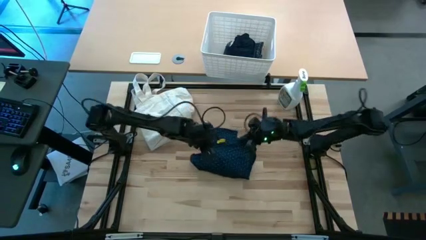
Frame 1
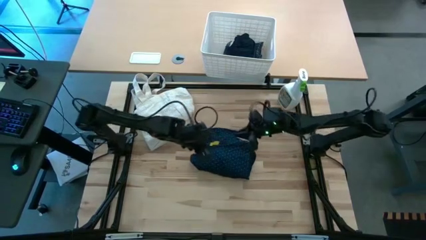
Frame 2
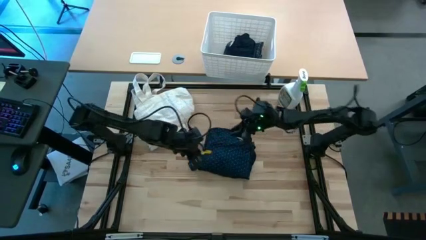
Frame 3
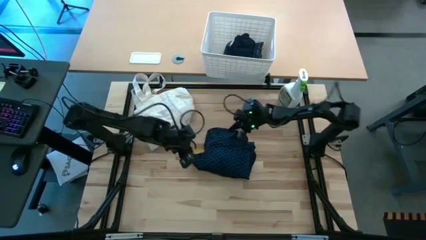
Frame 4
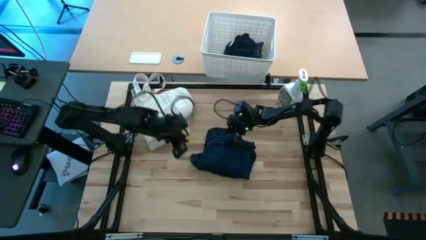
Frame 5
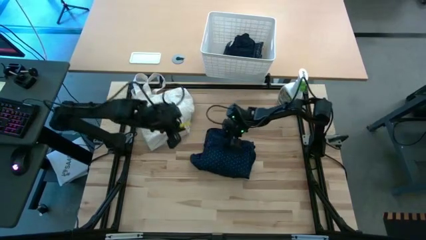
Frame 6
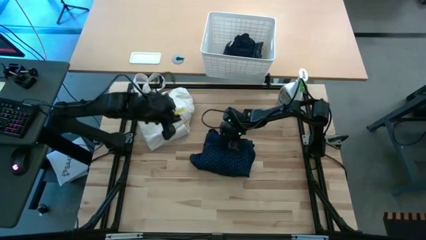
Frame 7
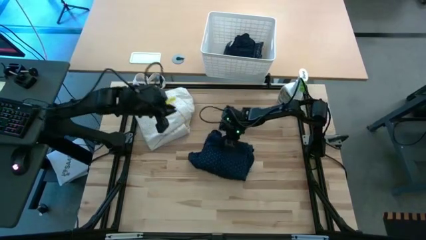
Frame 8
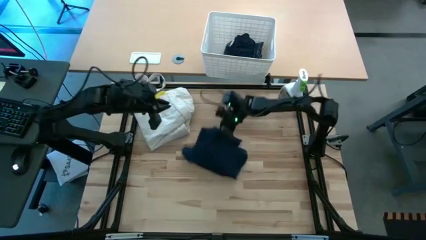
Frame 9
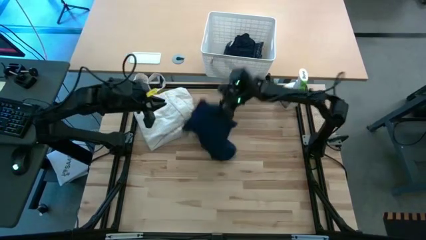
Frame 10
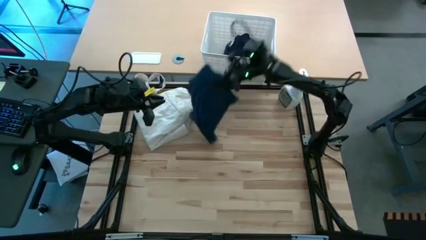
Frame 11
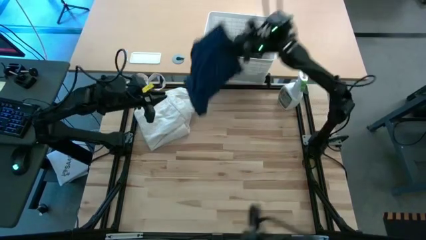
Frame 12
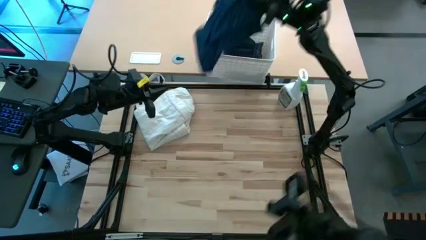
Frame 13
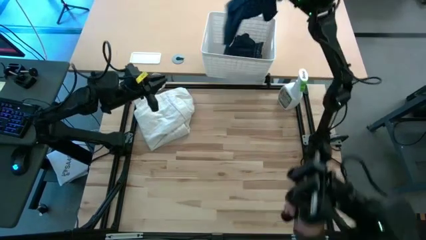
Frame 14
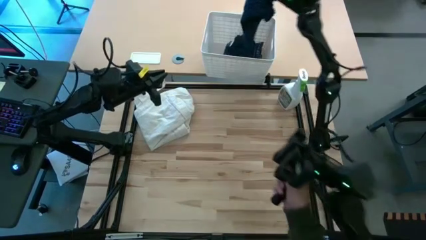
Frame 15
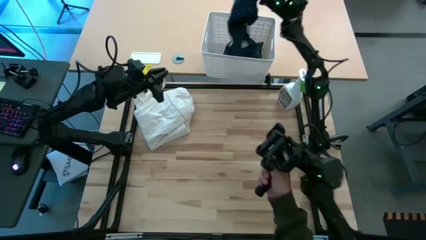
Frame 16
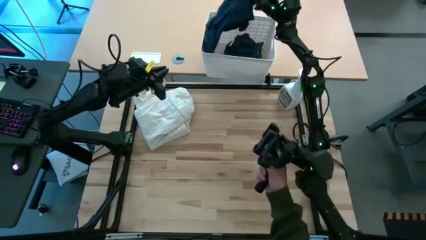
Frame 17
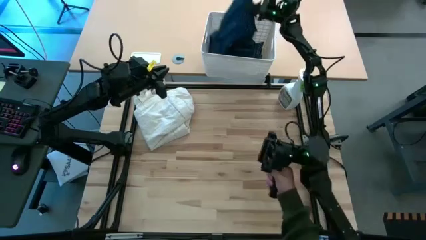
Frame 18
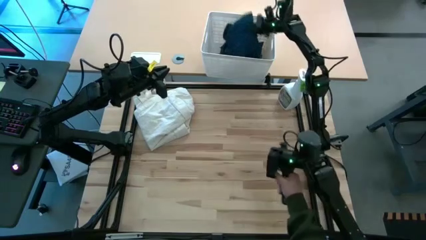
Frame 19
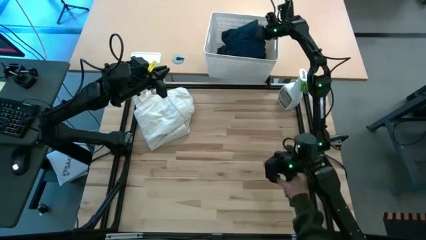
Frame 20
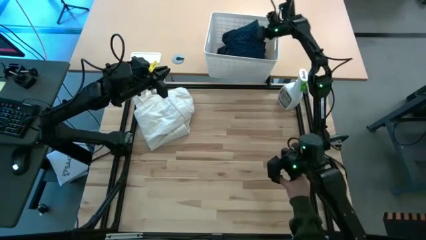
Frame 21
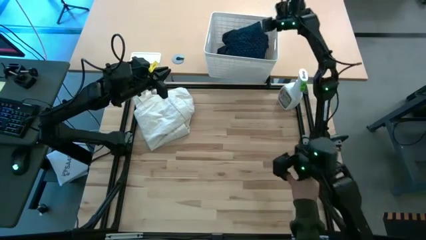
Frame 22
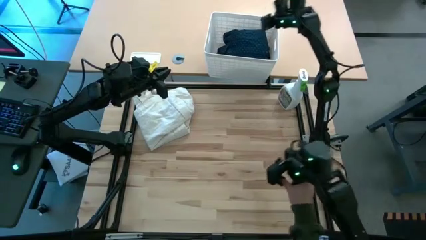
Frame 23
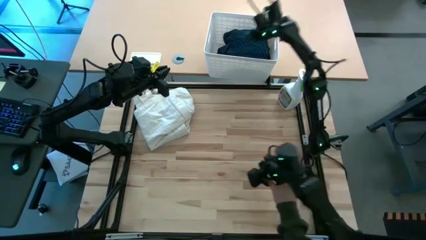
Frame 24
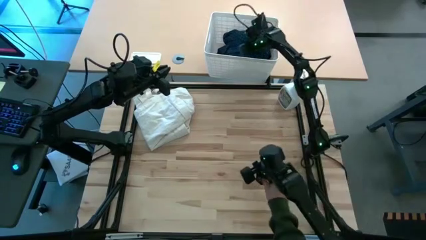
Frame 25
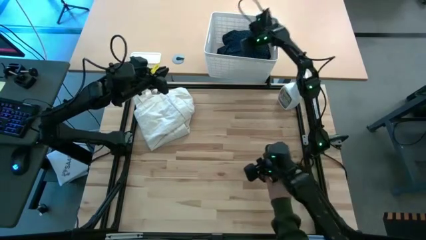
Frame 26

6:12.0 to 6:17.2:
Put the folded blue polo shirt into the white bin

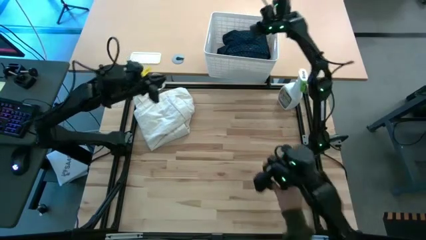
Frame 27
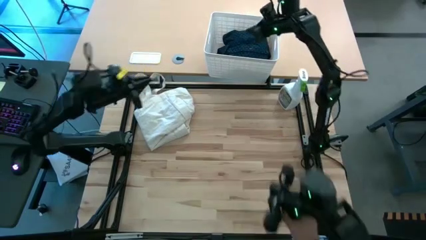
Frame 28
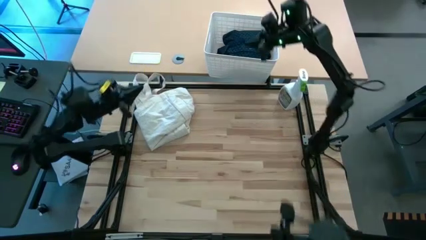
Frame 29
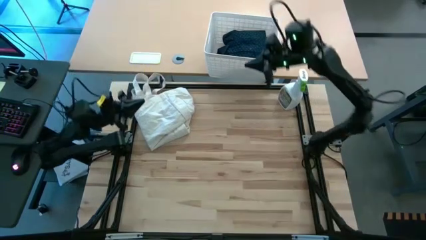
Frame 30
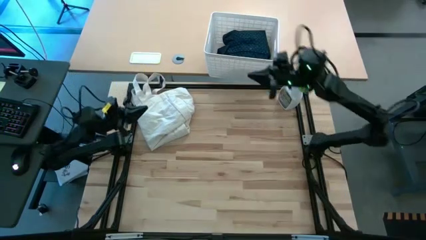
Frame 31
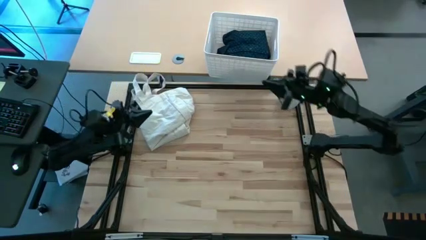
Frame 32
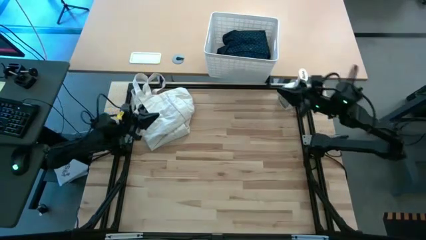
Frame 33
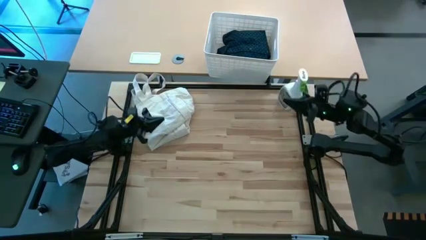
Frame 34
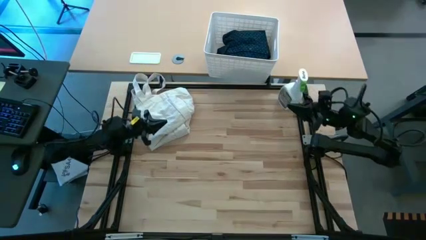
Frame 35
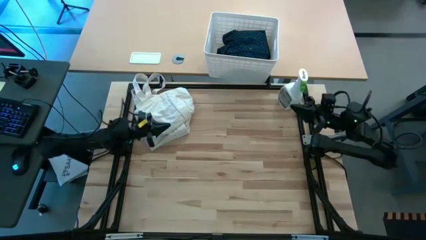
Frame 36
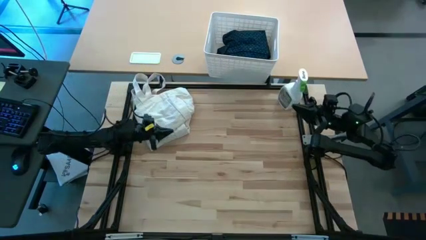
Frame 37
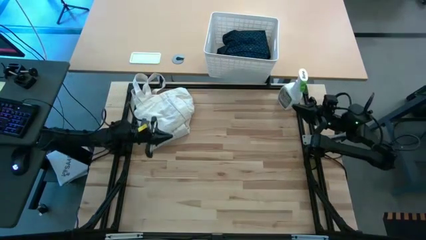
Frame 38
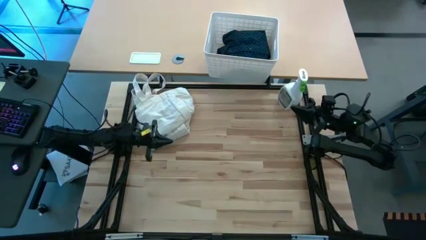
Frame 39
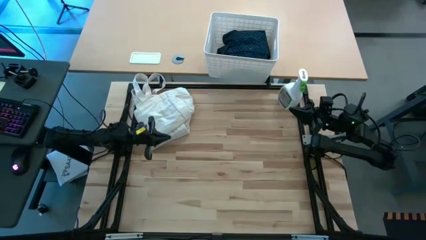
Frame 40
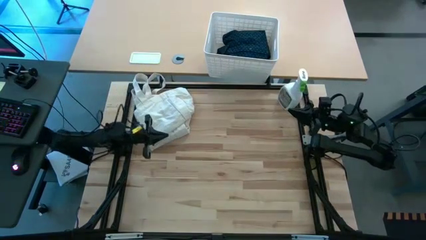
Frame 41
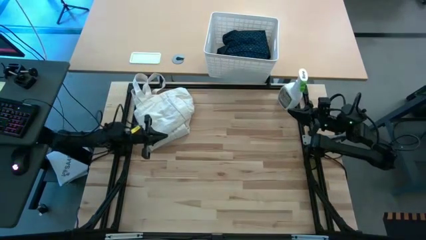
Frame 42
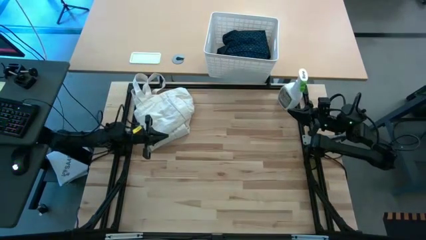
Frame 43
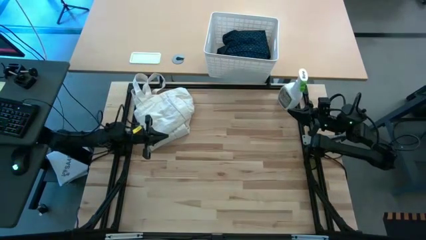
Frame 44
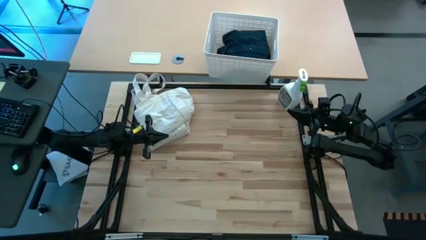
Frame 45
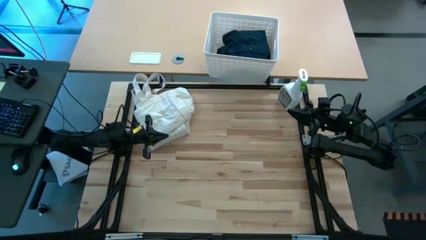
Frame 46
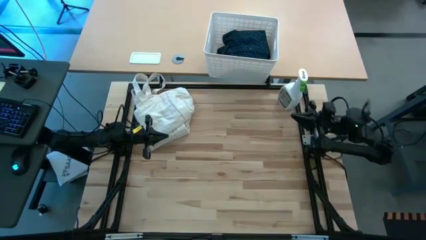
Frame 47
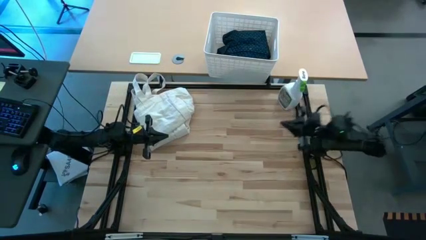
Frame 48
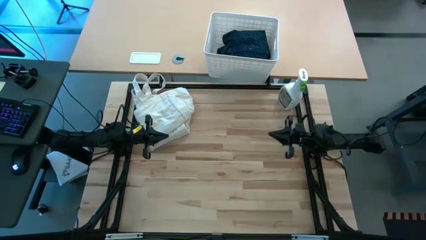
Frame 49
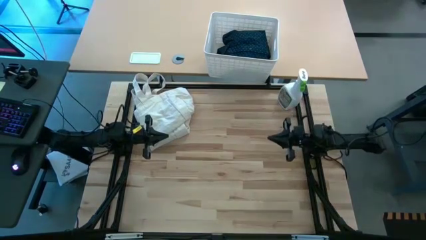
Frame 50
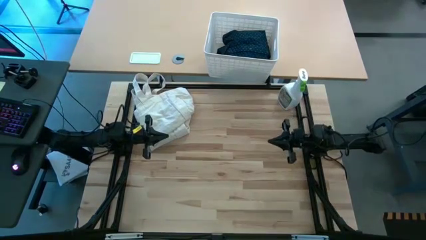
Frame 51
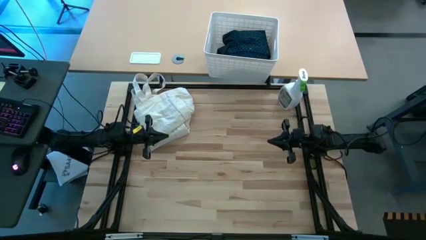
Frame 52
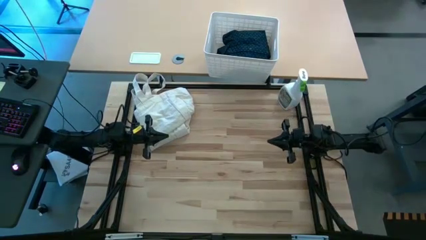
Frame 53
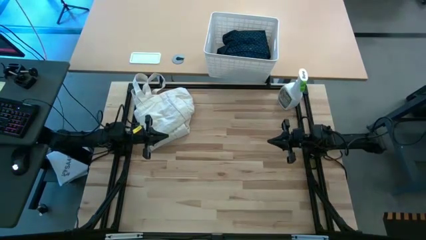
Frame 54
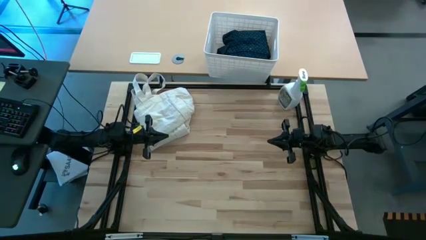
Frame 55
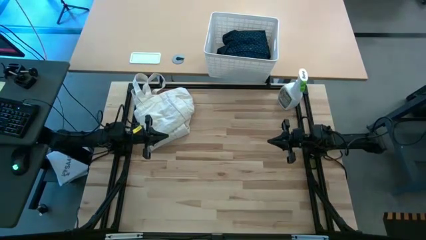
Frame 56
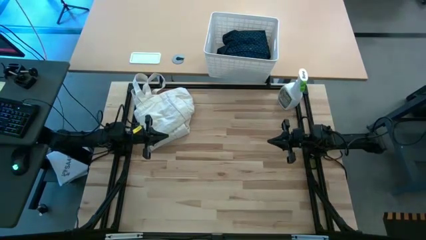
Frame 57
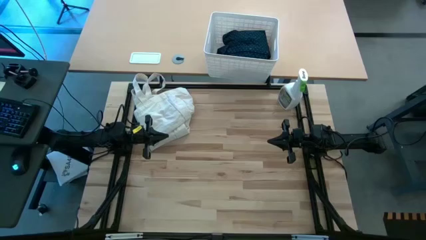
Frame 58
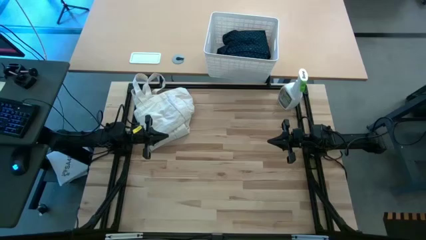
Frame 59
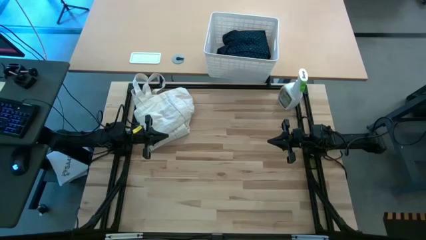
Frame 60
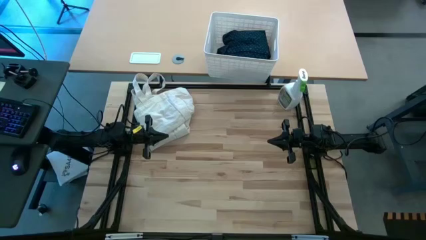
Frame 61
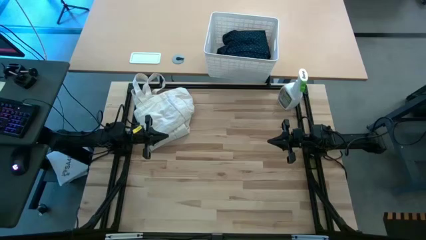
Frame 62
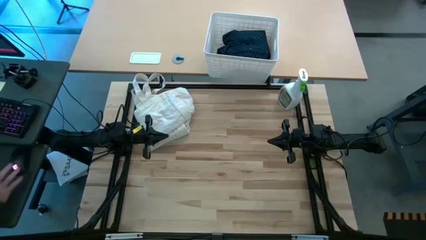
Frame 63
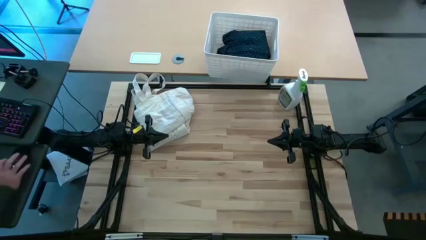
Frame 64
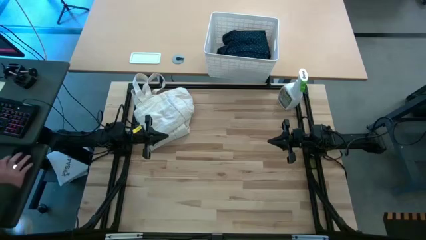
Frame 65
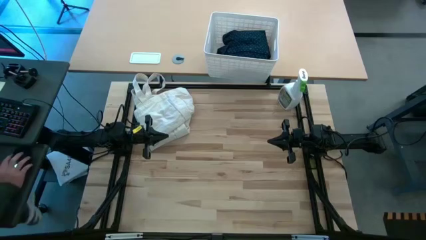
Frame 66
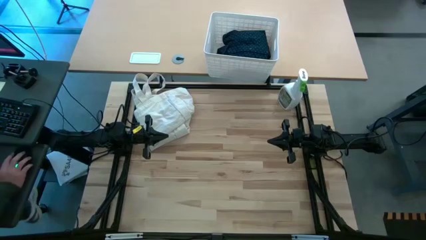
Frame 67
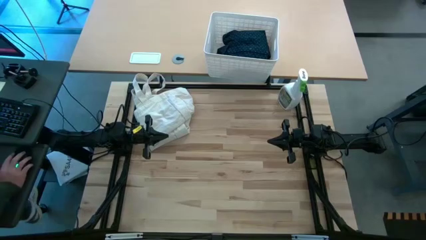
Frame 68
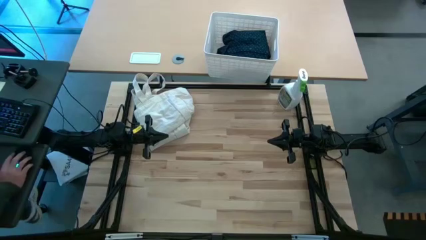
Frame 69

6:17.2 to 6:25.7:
Return to Home Position
